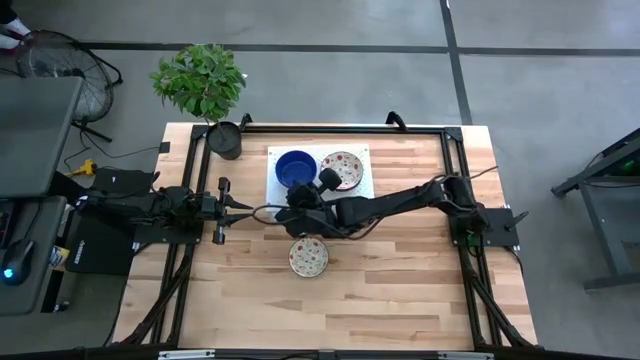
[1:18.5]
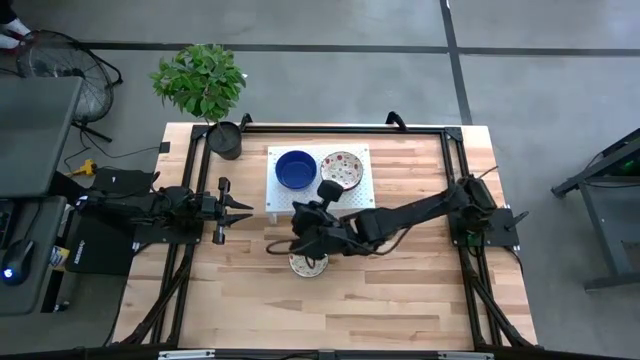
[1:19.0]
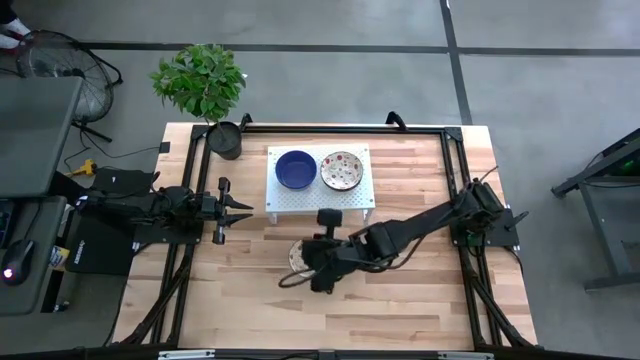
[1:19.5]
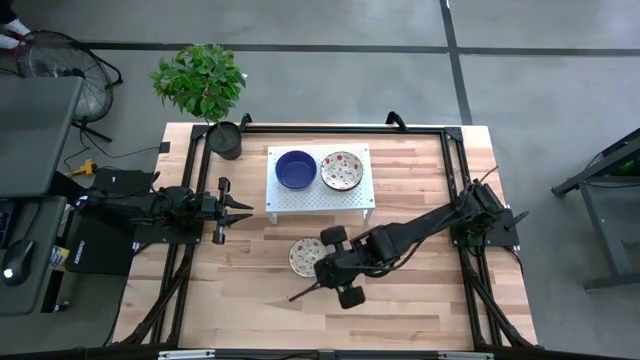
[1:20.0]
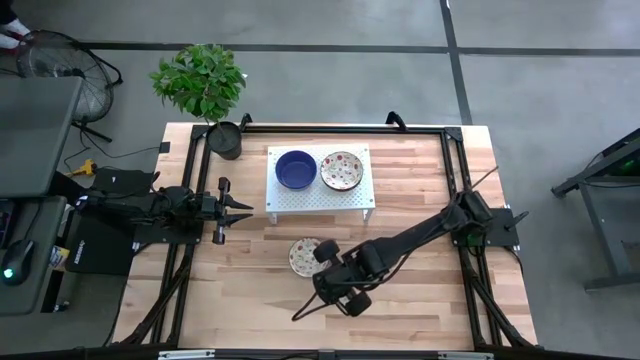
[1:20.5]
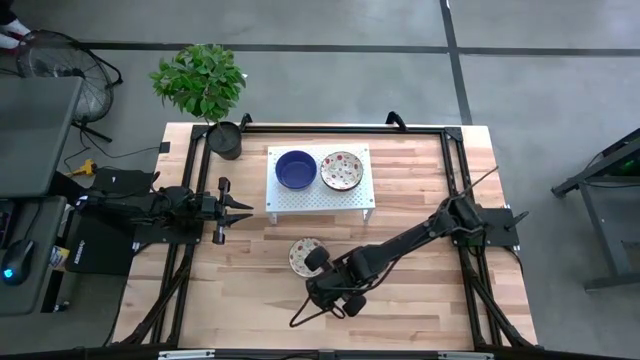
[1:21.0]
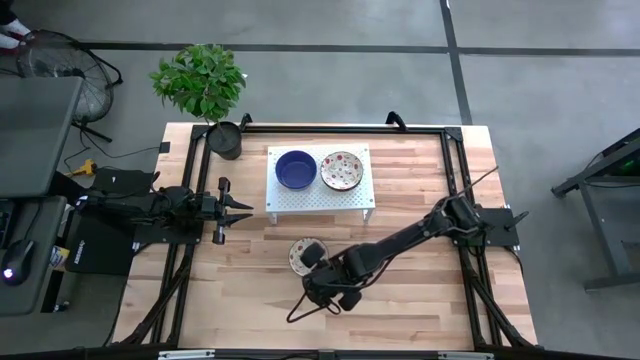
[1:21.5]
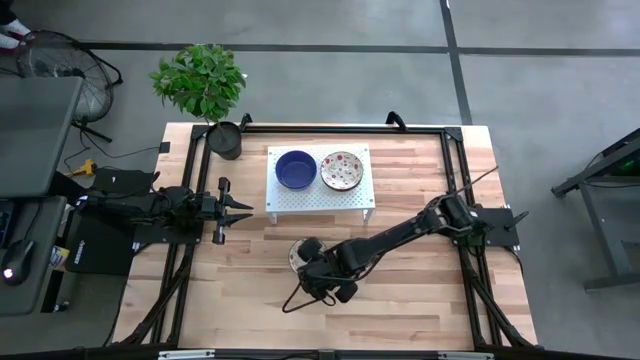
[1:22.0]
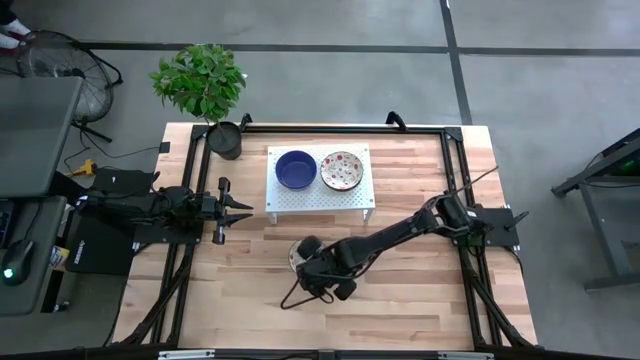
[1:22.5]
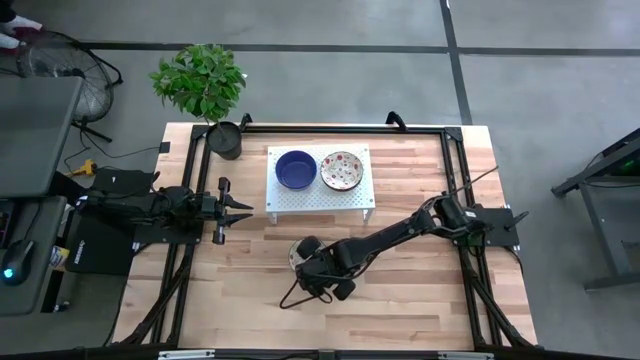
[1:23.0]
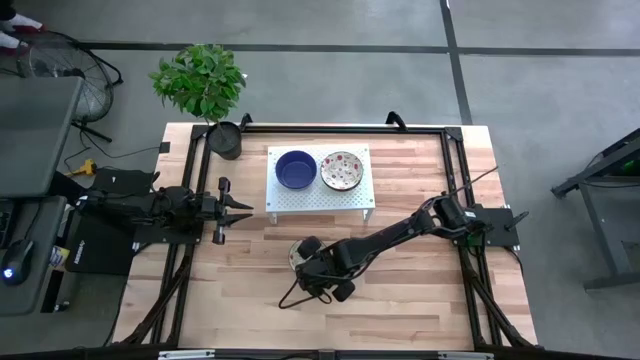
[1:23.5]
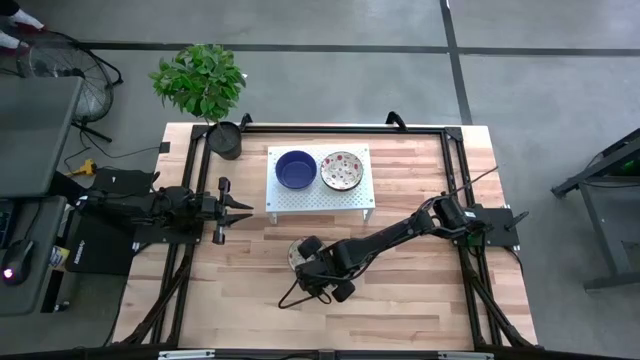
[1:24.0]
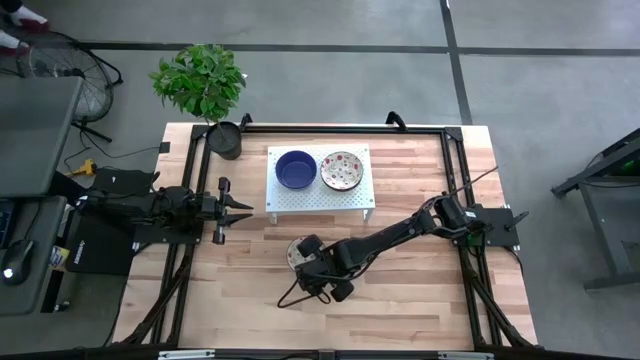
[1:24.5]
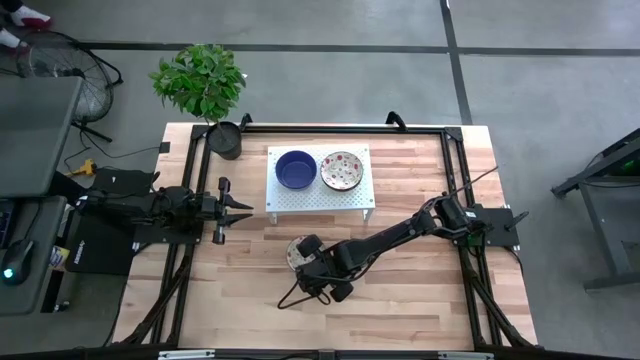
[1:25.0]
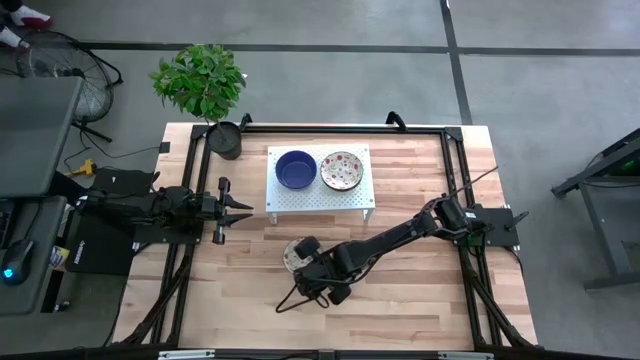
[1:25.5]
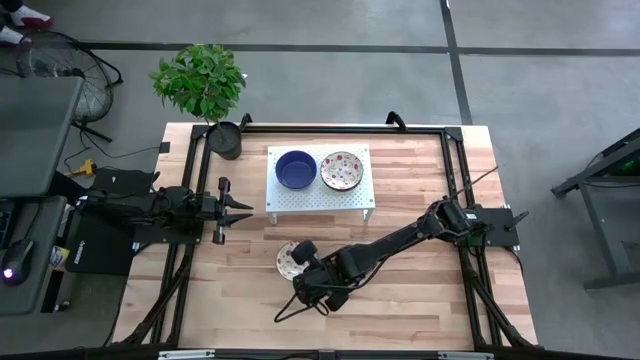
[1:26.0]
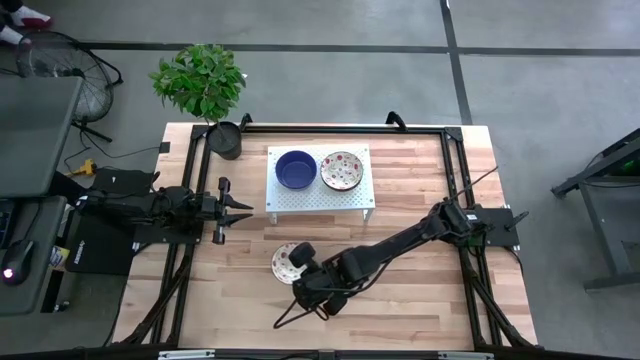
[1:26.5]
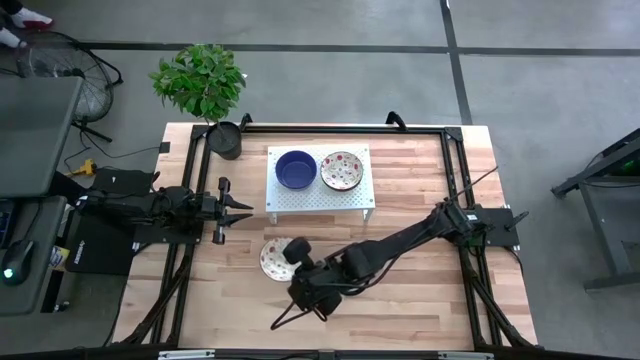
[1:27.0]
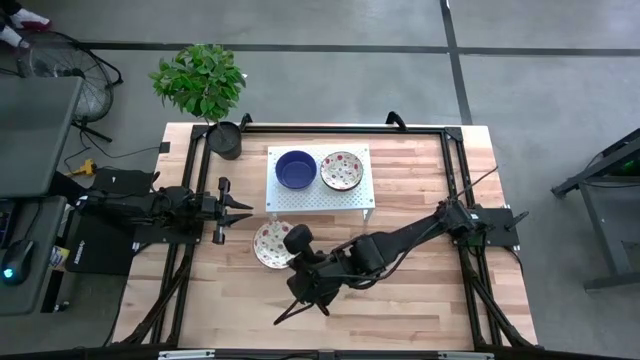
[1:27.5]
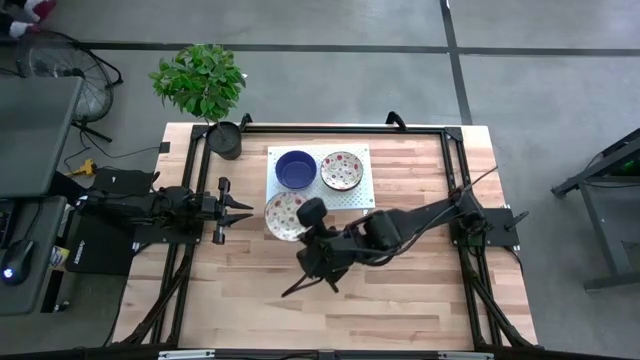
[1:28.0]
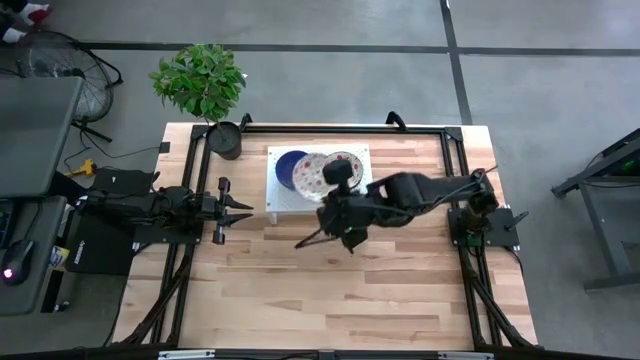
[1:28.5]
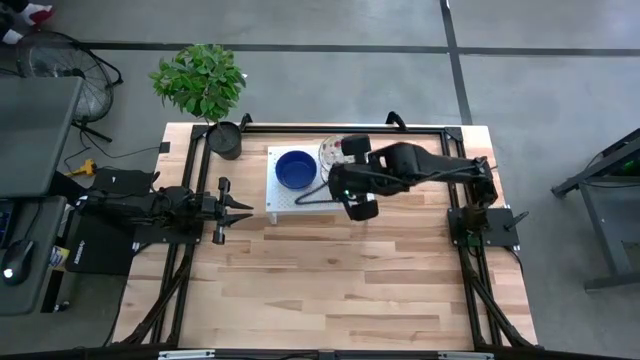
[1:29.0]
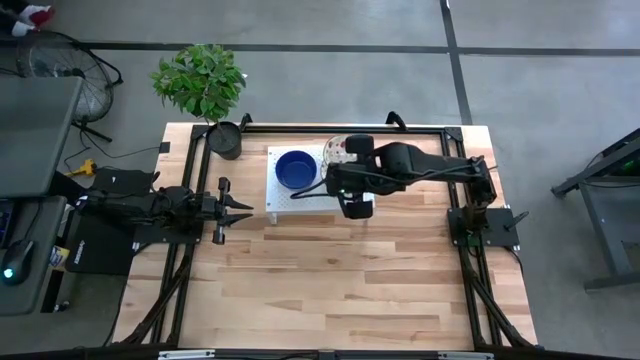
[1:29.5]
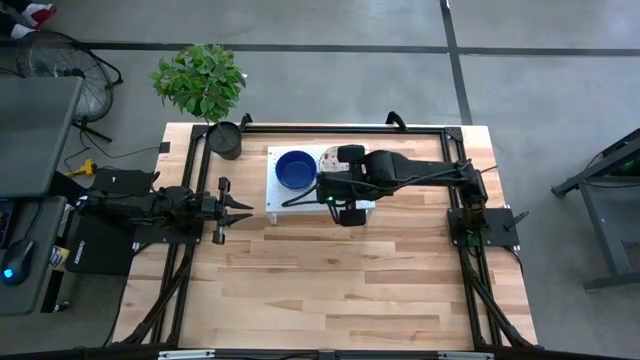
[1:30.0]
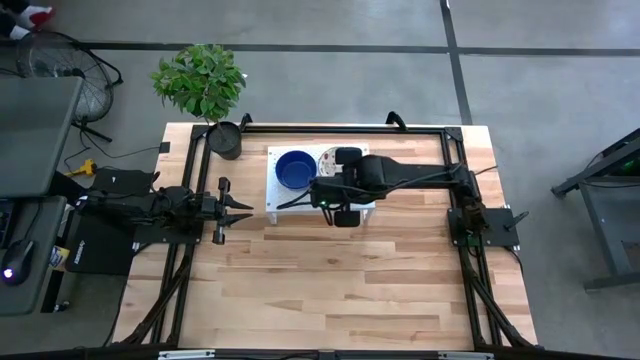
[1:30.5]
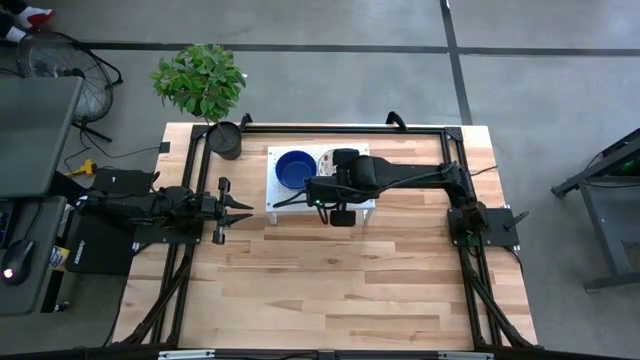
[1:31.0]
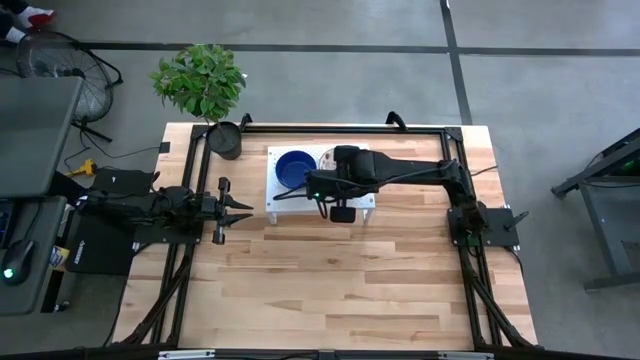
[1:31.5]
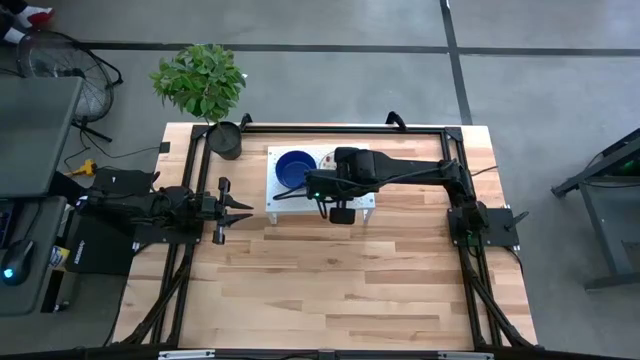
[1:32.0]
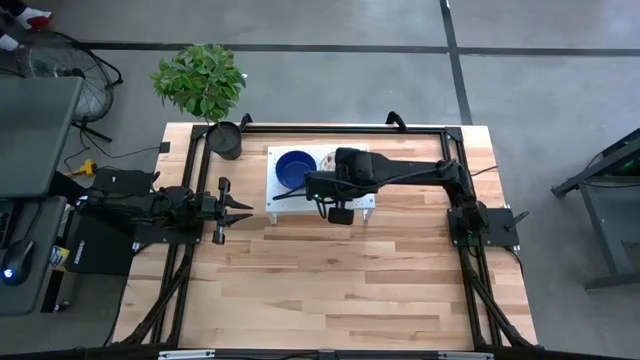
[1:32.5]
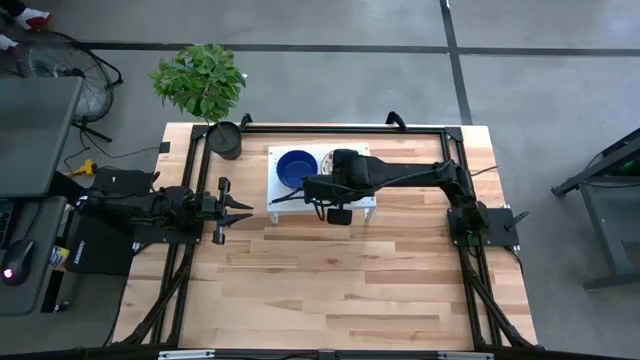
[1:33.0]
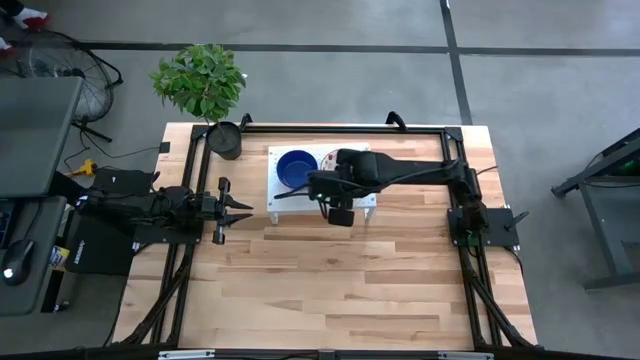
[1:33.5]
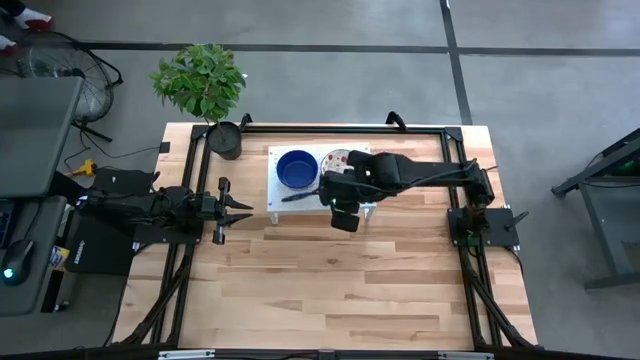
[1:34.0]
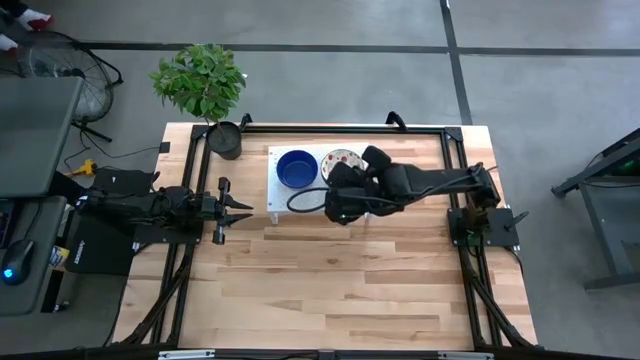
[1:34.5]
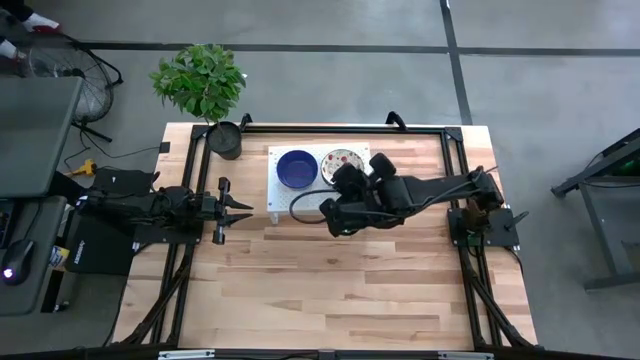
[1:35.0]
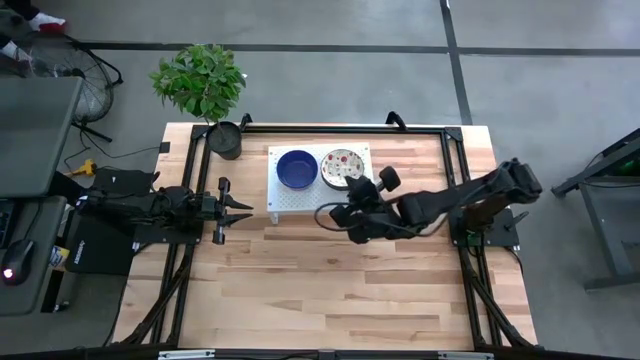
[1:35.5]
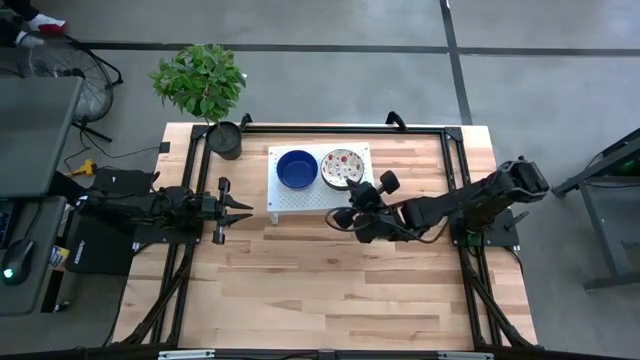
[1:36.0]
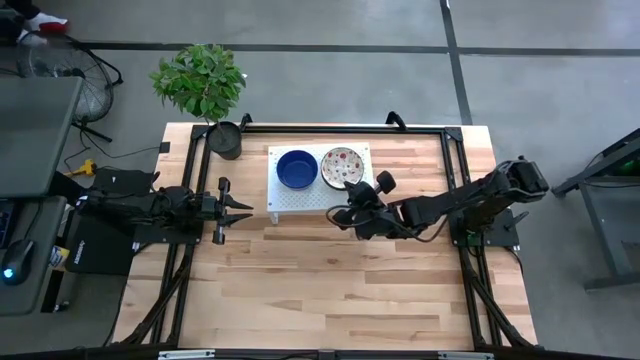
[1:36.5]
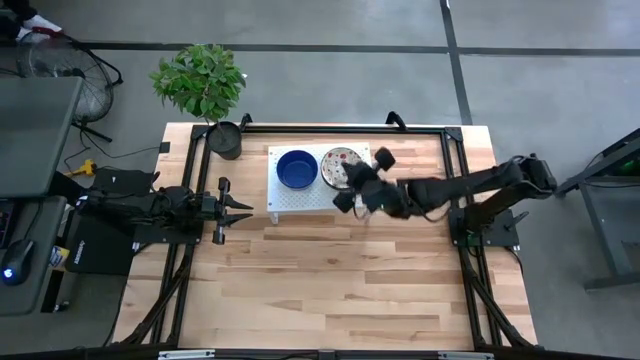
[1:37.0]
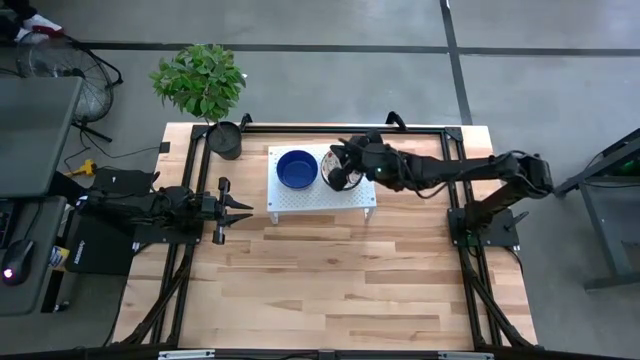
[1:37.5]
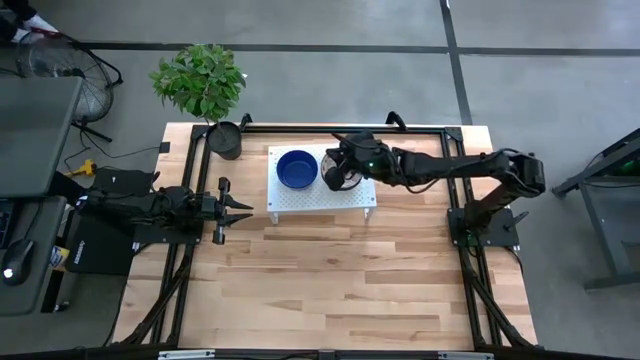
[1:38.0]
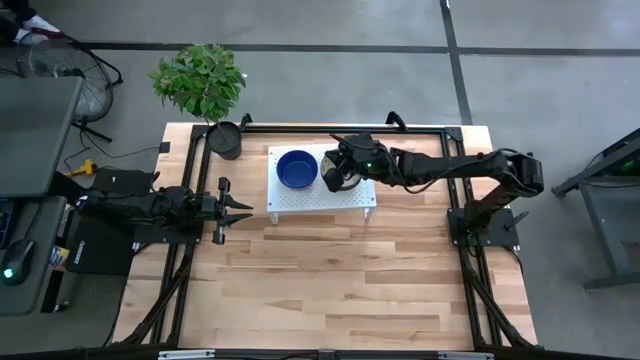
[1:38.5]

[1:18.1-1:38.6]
Task: Pick & Place Mini bowls
Stack the red patterned bowl on top of the red patterned bowl on the shelf

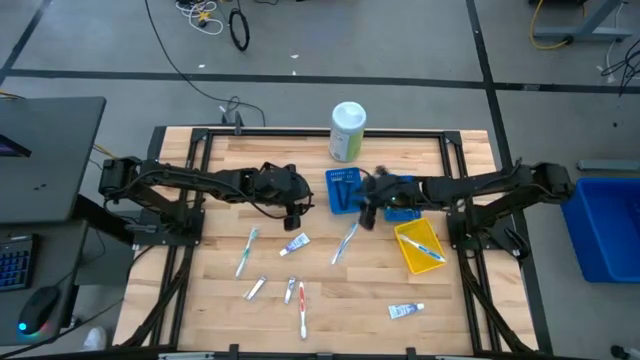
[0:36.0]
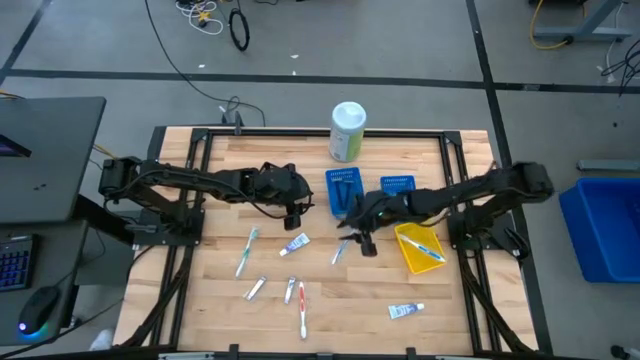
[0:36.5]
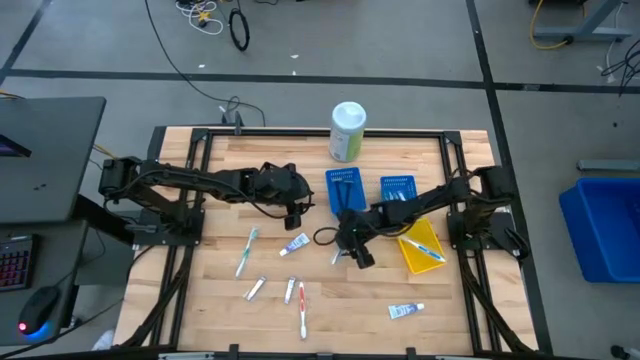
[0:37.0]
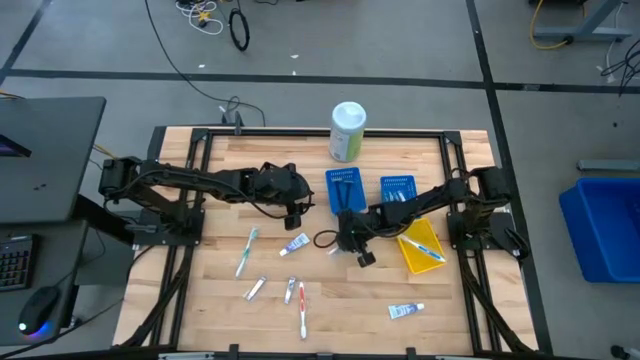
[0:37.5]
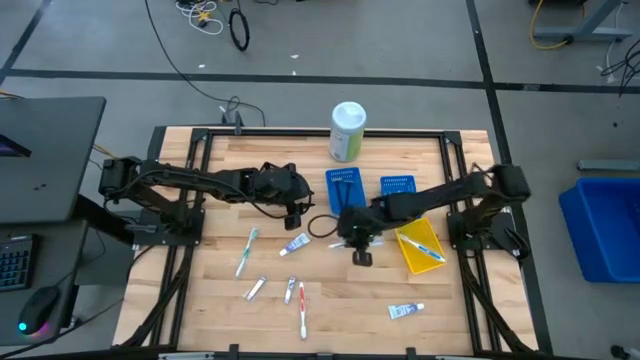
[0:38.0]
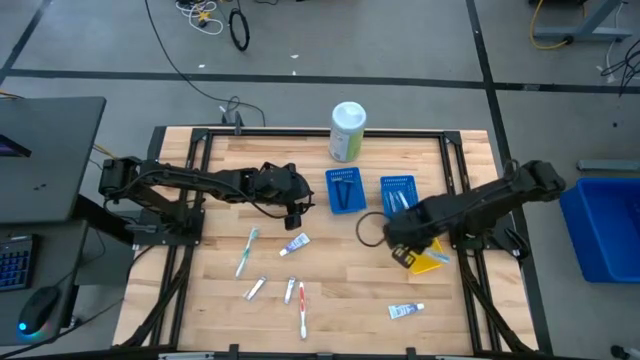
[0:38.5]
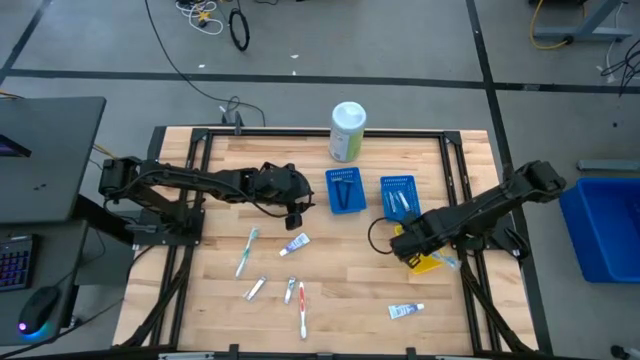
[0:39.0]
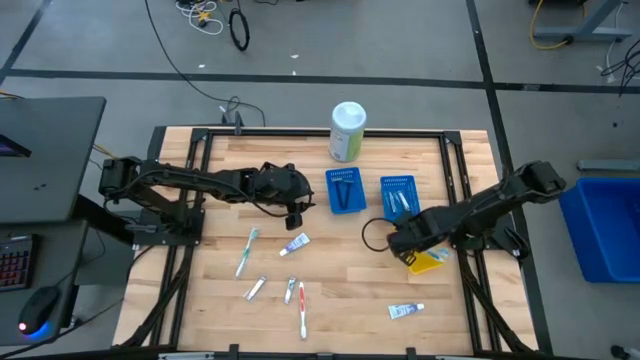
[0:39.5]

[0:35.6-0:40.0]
Task: Pick & Place Travel size toiletries
Put the blue toothbrush into the yellow basket
